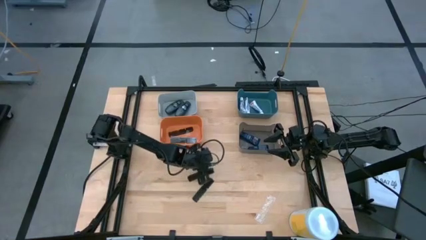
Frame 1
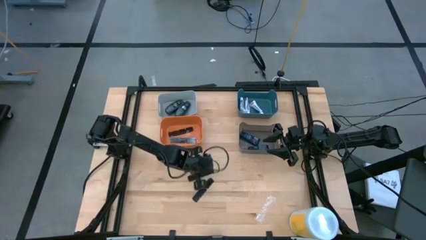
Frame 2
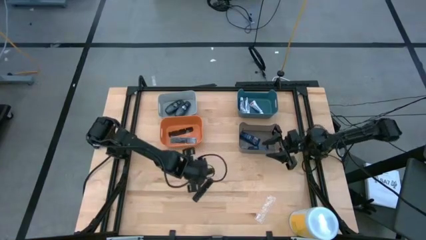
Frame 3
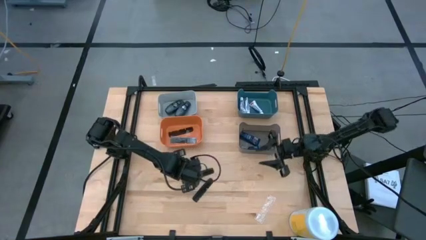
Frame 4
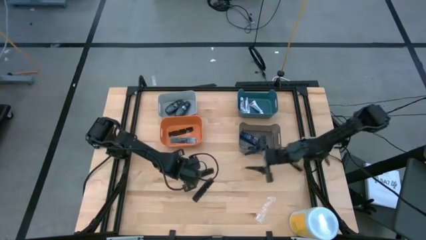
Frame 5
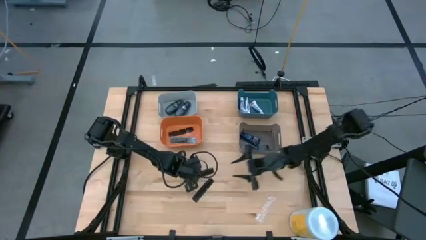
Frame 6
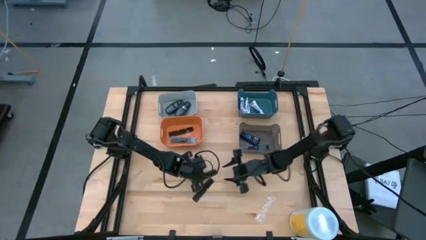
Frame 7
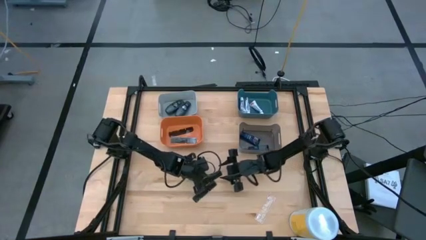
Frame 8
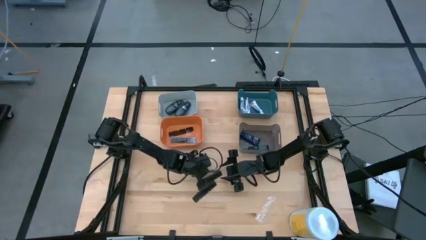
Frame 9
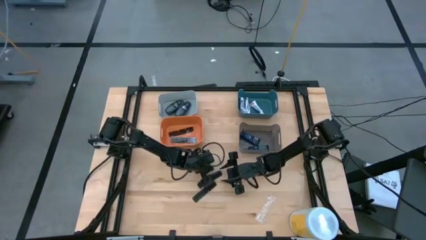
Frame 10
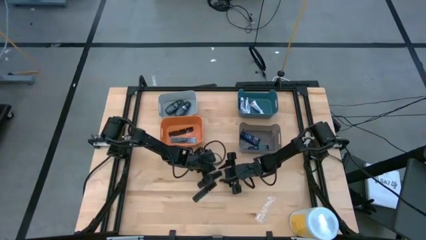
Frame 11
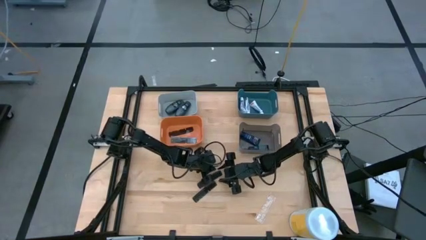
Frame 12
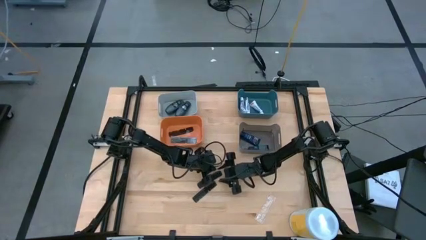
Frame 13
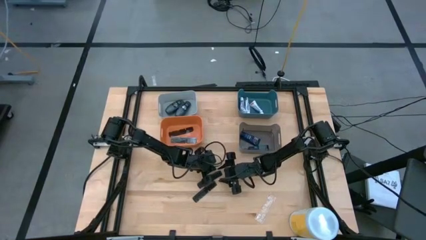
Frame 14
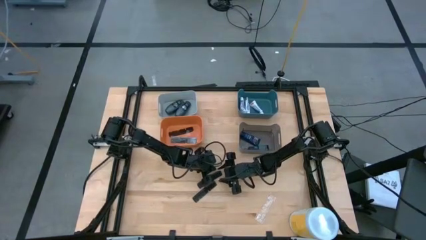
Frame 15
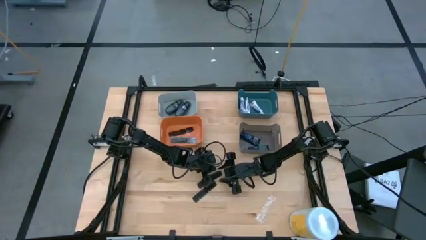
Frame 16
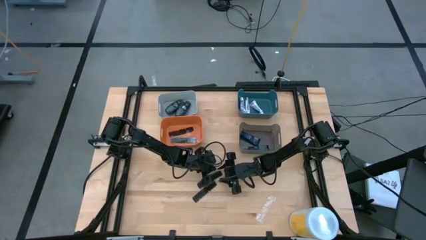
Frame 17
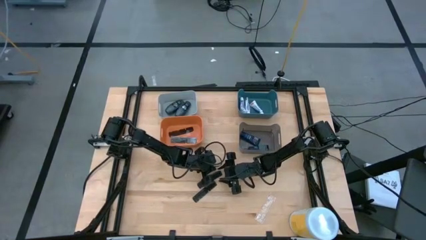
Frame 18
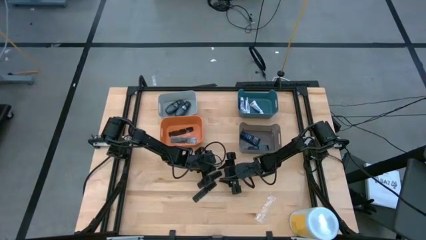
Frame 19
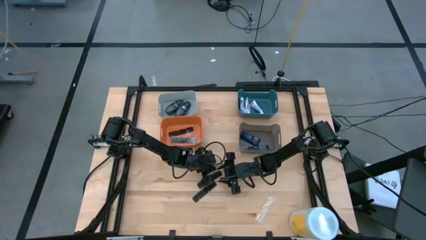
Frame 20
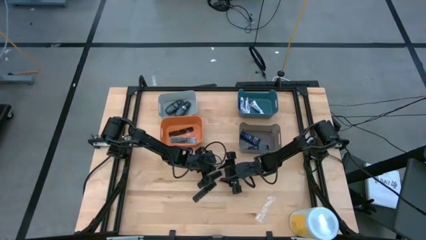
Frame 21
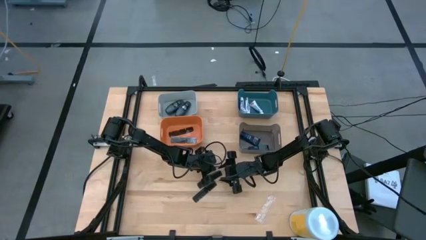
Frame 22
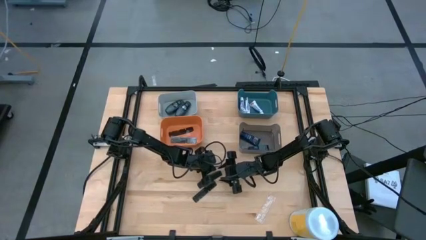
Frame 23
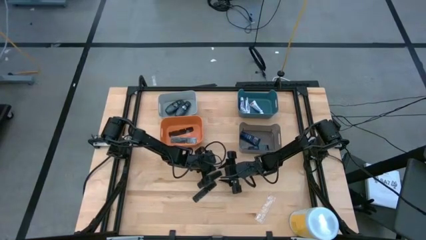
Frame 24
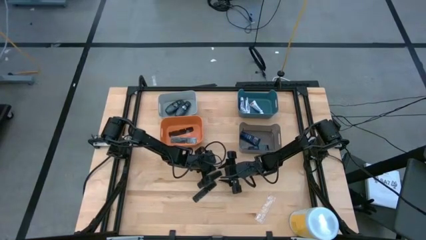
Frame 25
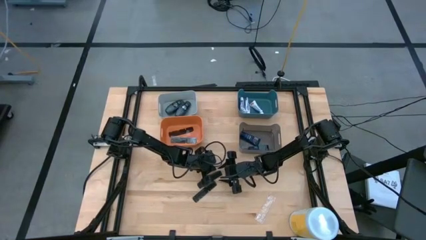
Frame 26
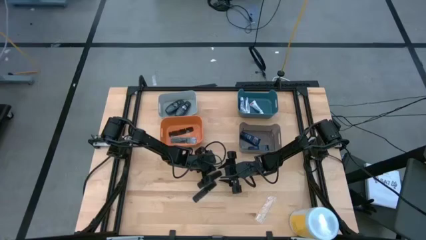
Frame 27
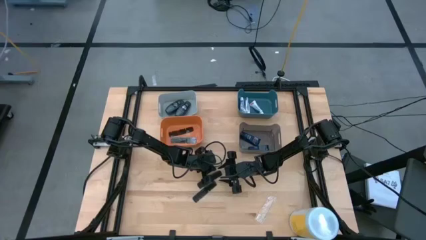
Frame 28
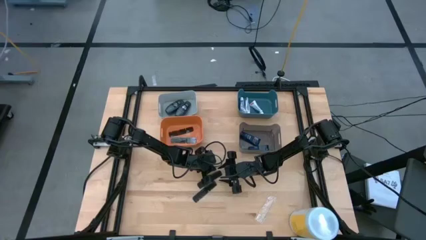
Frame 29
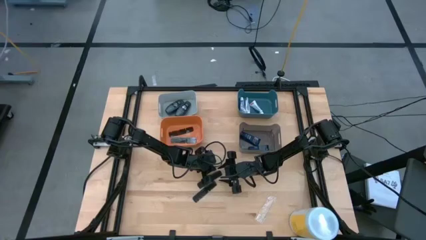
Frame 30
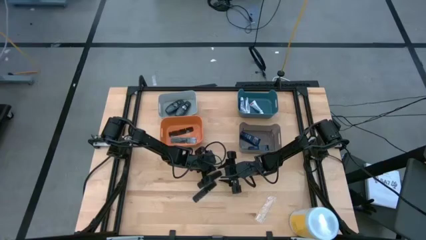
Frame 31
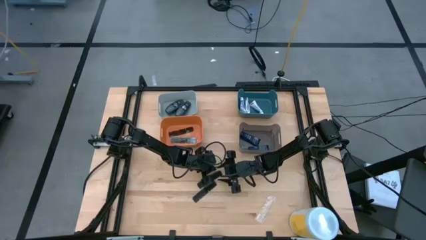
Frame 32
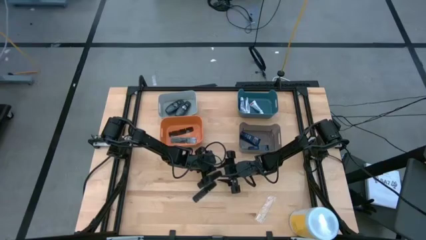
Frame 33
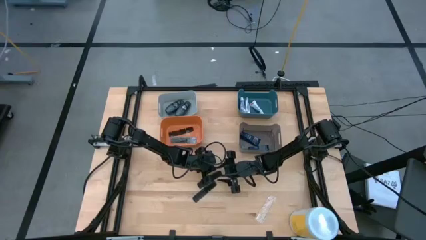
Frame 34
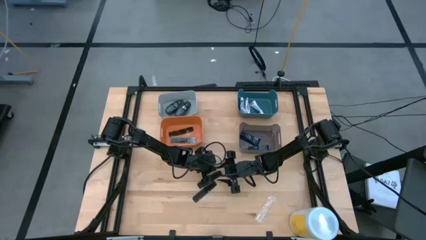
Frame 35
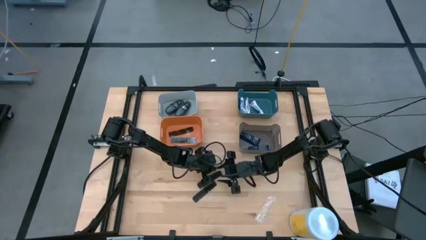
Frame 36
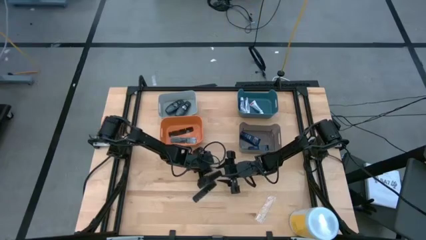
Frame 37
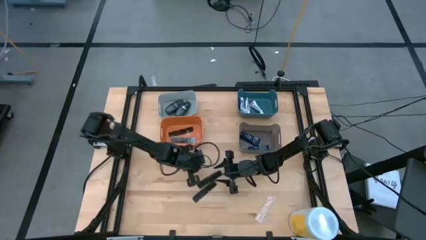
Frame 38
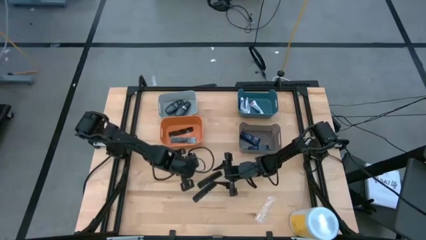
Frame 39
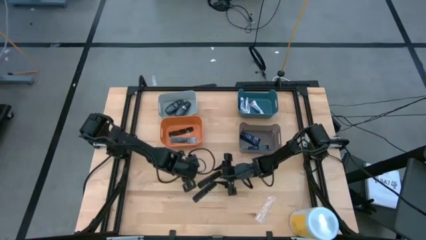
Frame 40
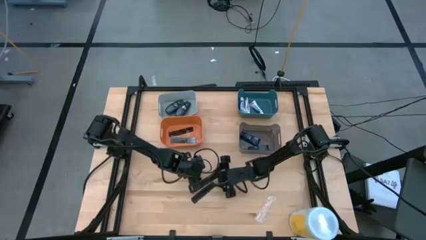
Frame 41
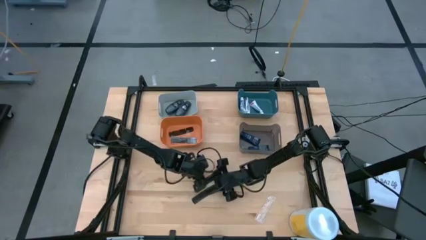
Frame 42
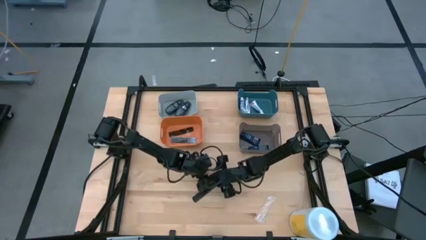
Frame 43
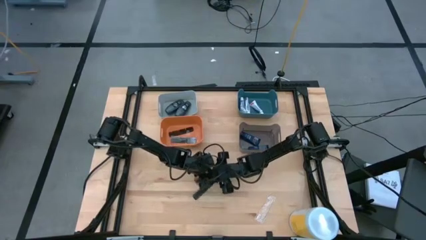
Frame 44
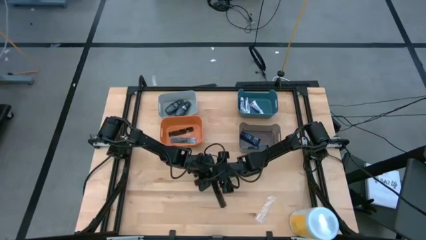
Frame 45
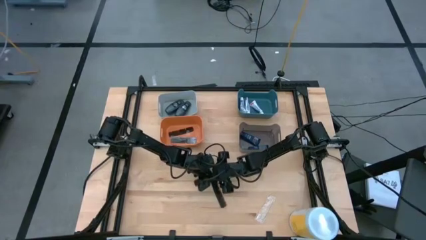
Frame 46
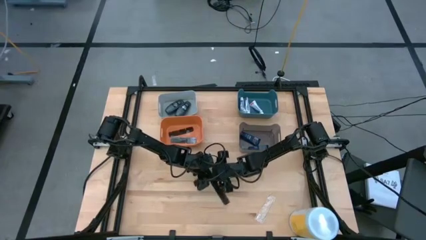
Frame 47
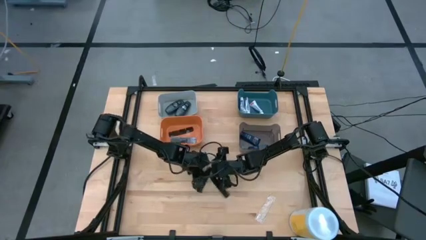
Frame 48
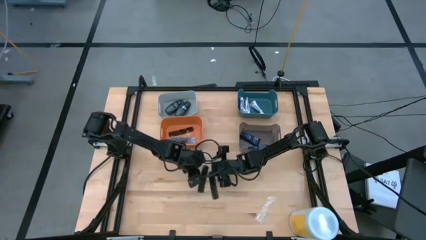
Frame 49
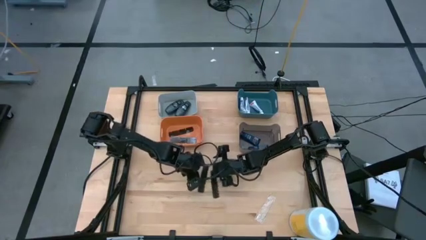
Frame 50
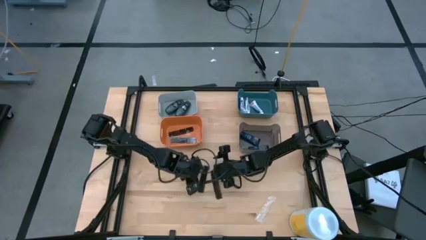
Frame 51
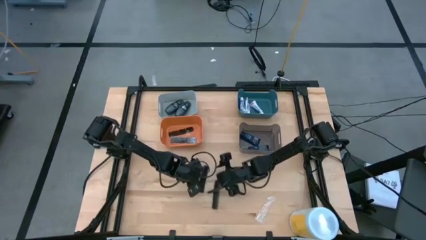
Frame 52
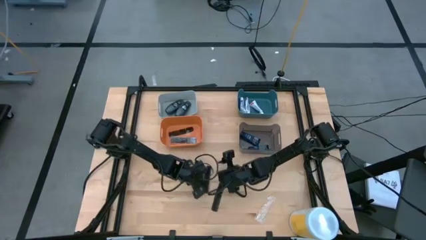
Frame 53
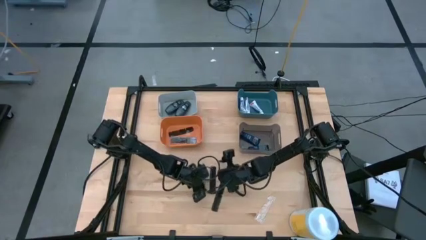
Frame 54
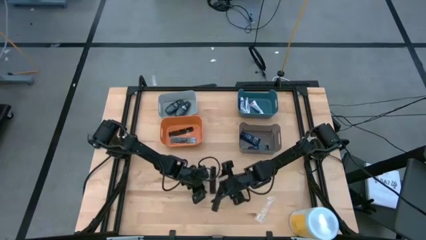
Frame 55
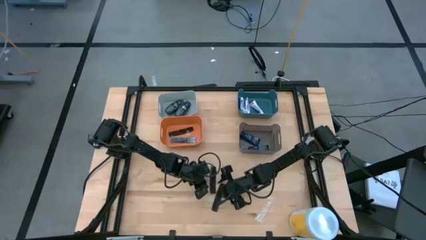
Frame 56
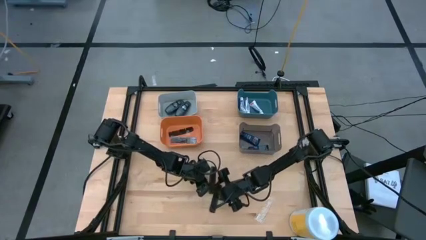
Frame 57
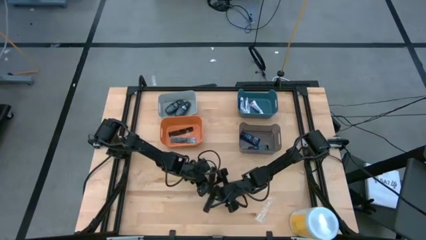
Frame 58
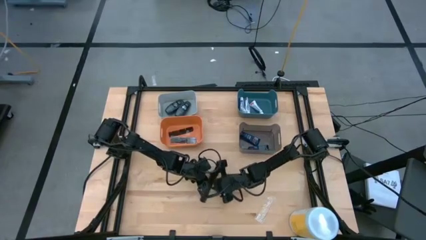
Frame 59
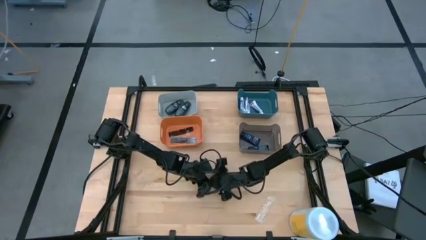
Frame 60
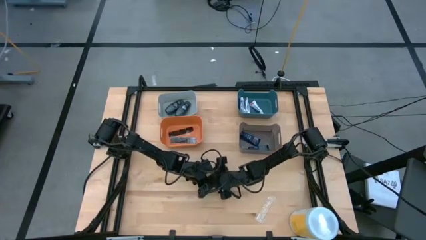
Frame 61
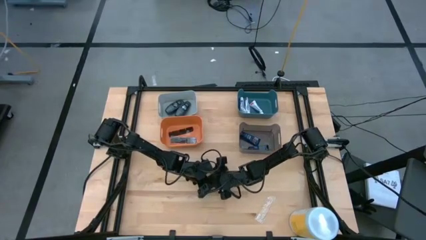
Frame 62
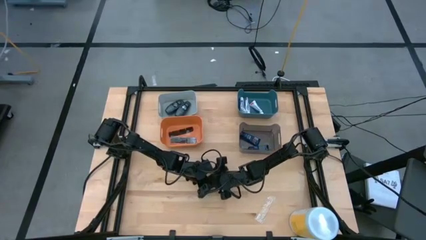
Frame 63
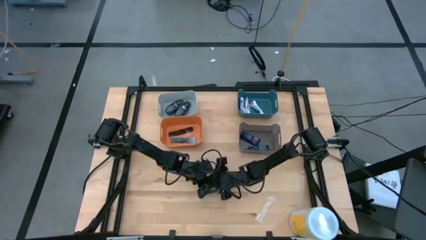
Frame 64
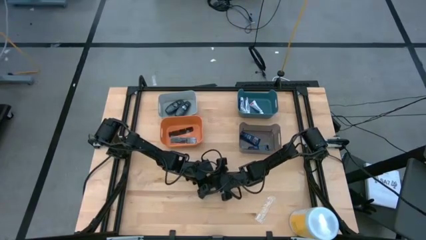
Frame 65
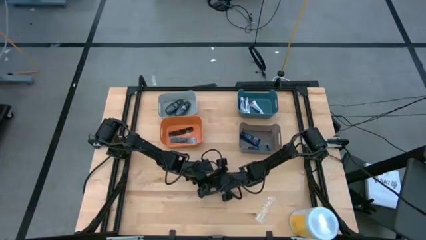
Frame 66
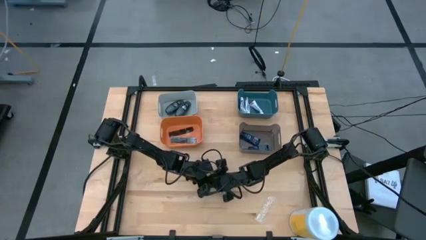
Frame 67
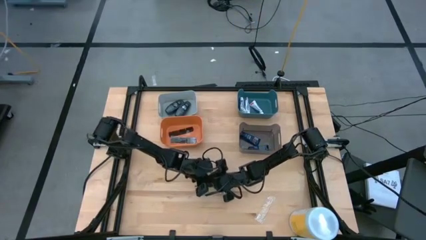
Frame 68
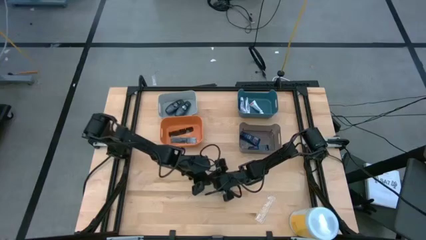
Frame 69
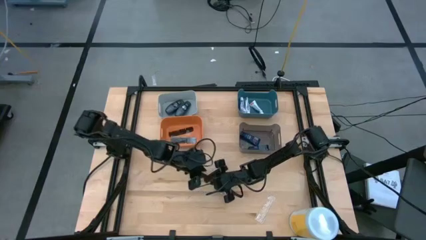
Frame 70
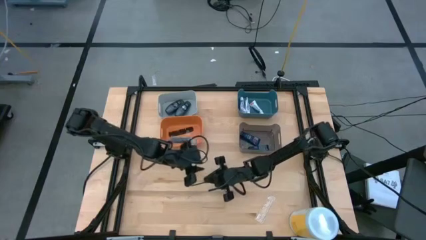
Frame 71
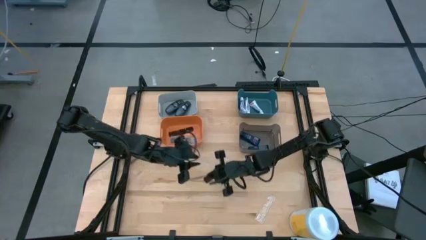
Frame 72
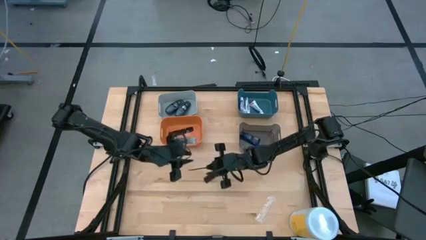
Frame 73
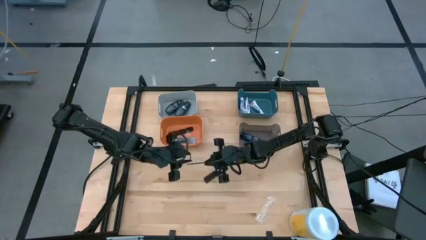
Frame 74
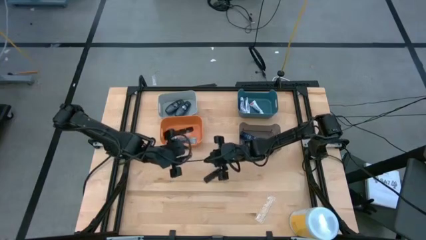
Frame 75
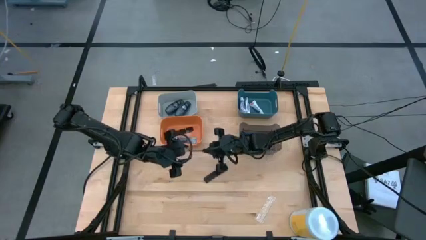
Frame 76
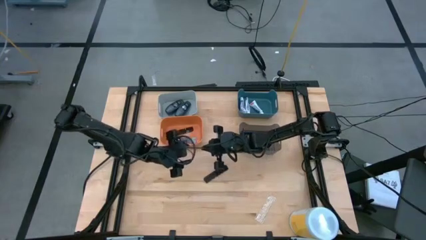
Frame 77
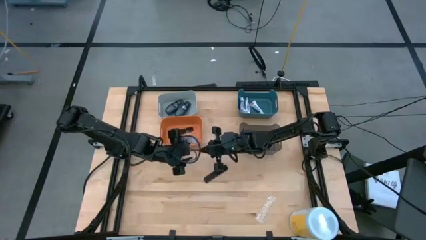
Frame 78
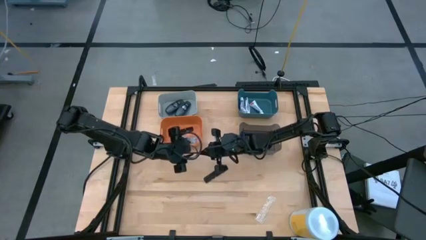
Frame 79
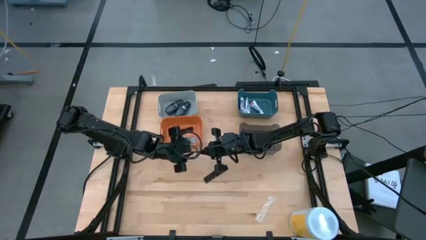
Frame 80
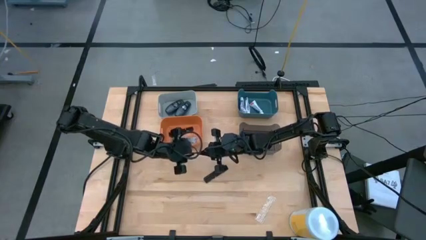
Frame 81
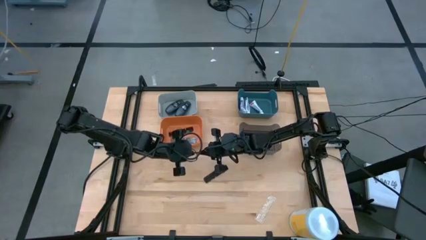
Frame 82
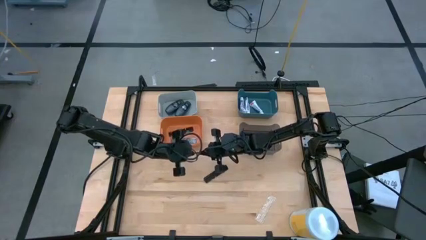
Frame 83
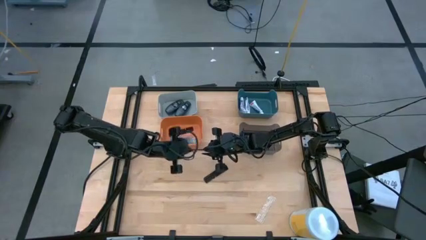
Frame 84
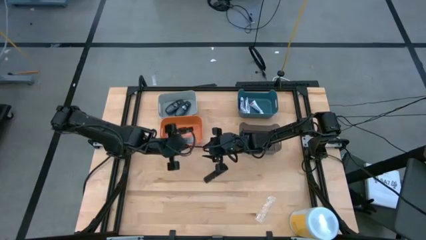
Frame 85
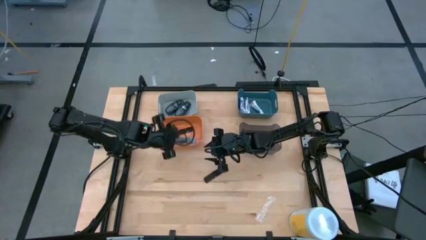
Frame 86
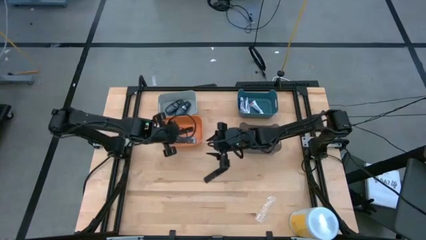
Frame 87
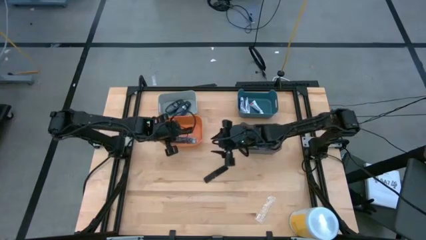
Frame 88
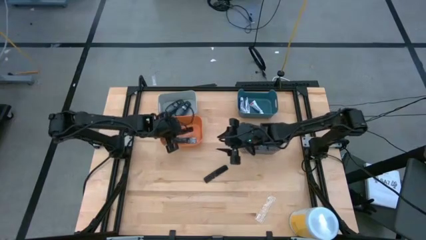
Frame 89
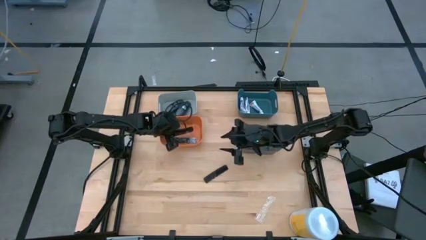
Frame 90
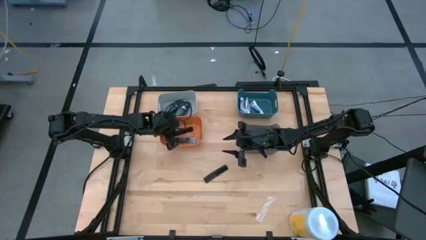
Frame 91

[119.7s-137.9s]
Task: Pick & Place Travel size toiletries
Put the black comb into the orange bin
